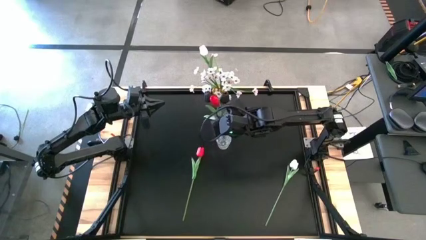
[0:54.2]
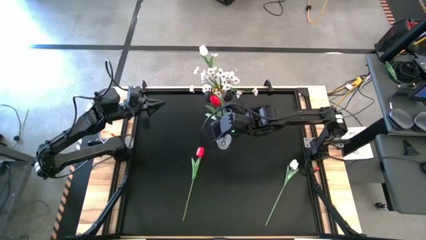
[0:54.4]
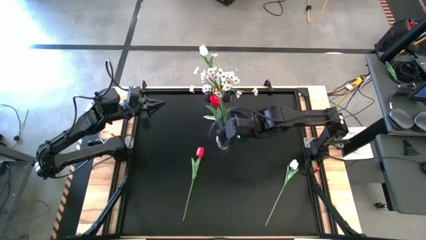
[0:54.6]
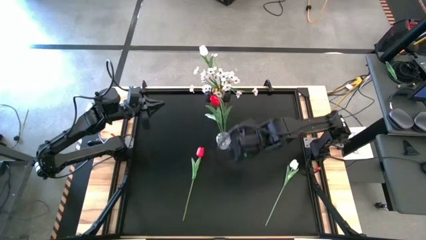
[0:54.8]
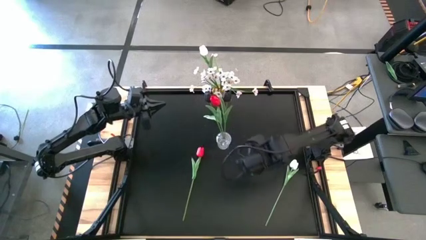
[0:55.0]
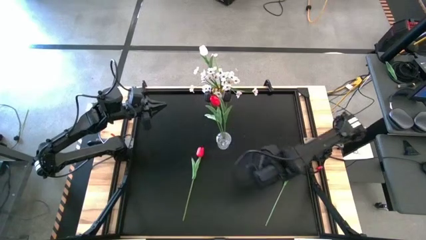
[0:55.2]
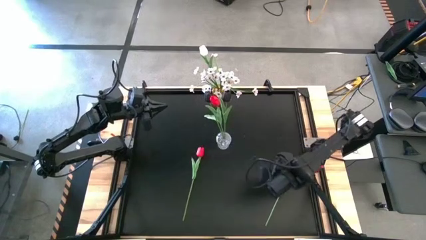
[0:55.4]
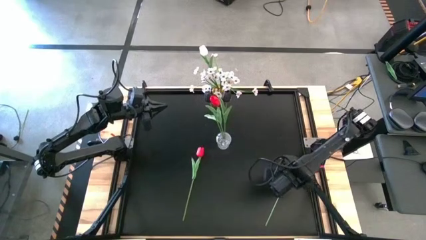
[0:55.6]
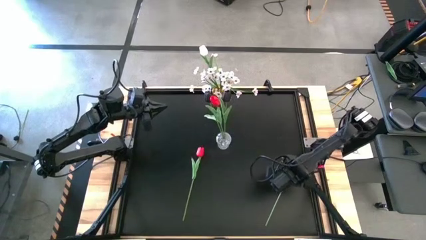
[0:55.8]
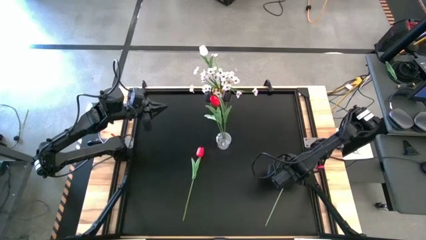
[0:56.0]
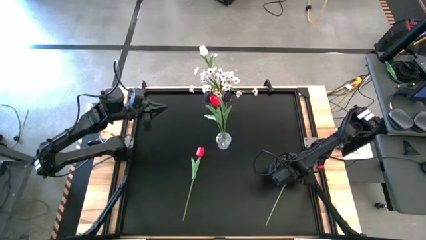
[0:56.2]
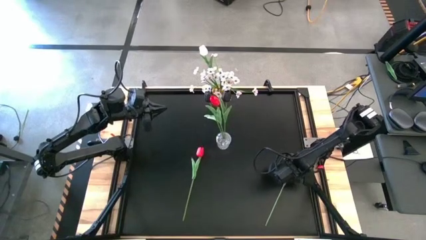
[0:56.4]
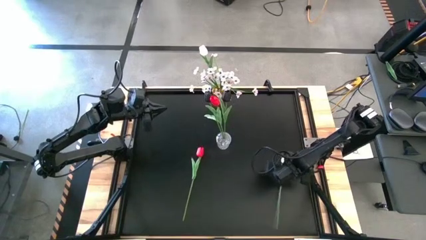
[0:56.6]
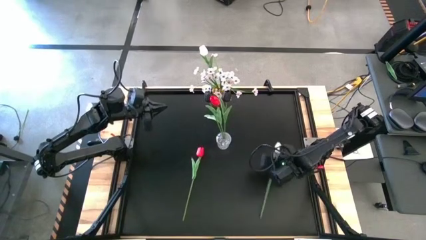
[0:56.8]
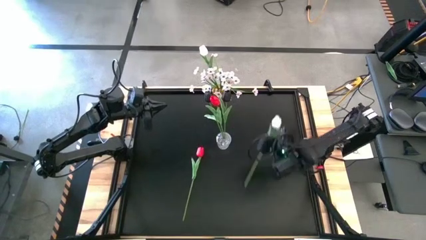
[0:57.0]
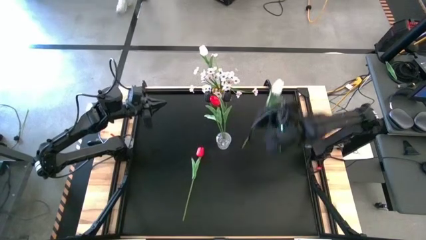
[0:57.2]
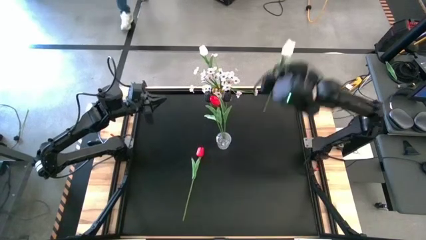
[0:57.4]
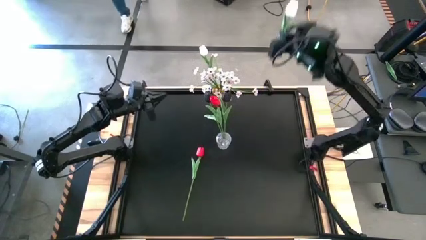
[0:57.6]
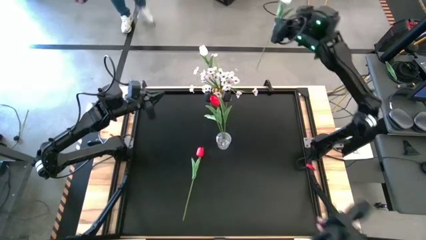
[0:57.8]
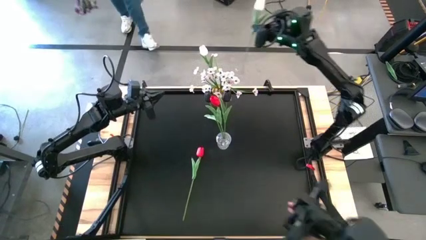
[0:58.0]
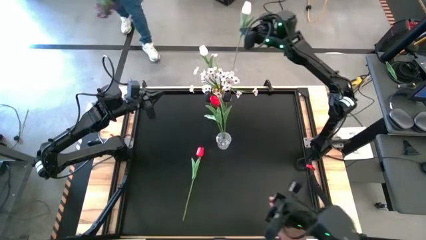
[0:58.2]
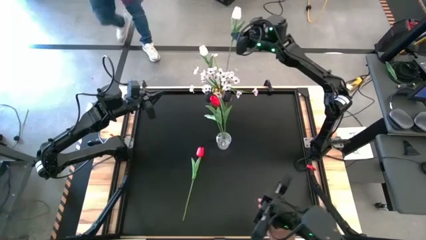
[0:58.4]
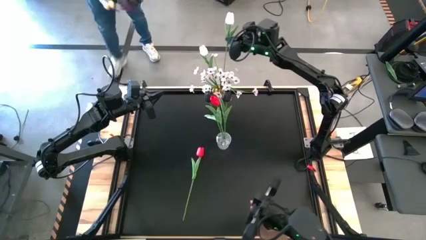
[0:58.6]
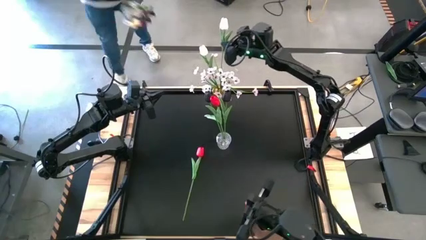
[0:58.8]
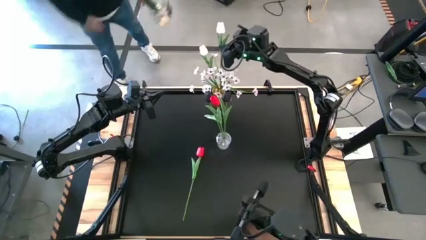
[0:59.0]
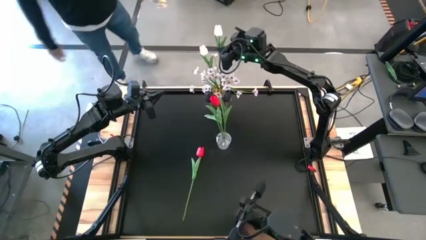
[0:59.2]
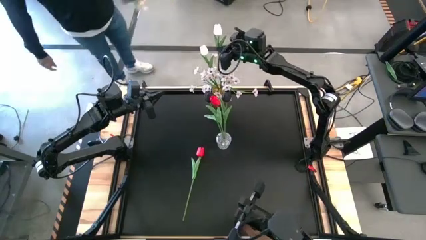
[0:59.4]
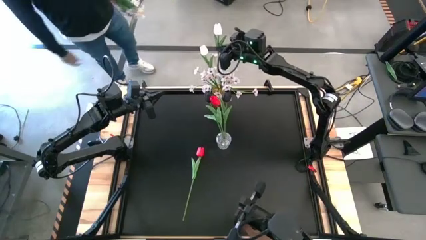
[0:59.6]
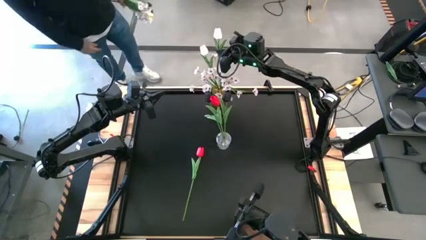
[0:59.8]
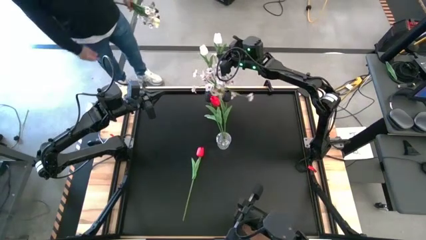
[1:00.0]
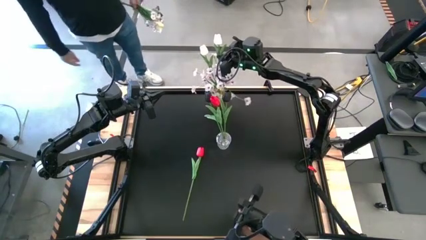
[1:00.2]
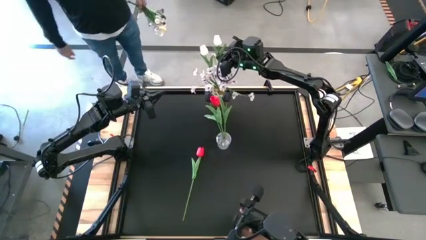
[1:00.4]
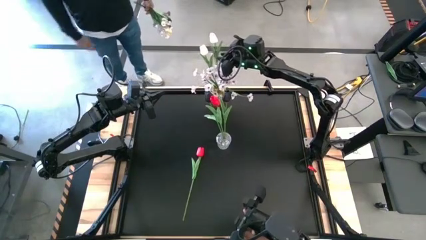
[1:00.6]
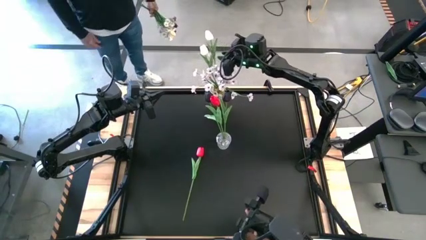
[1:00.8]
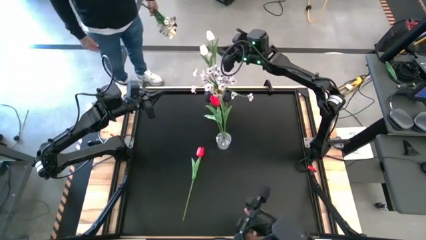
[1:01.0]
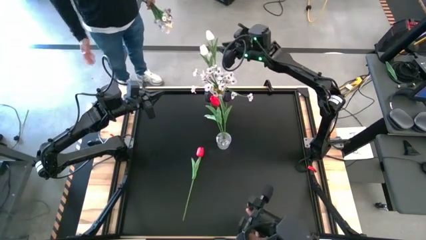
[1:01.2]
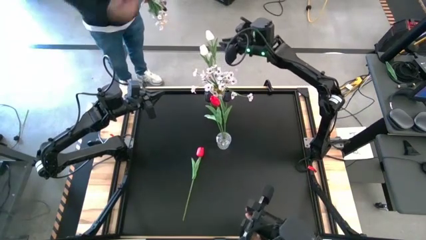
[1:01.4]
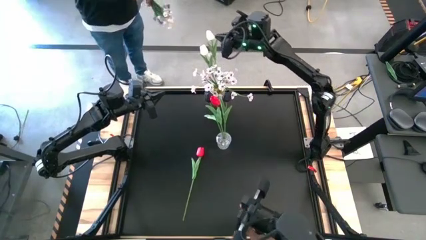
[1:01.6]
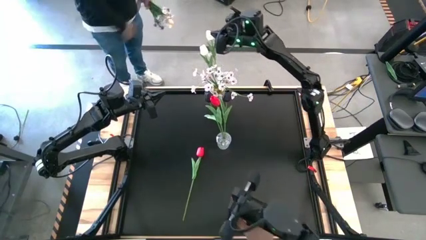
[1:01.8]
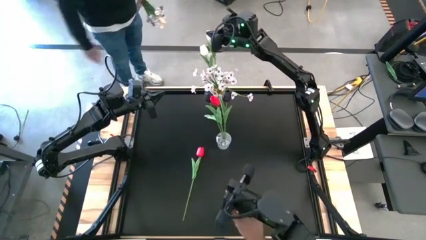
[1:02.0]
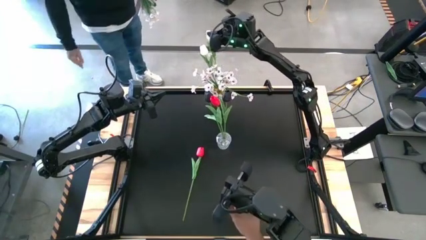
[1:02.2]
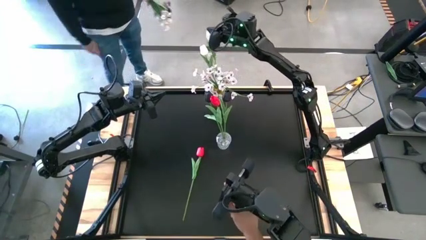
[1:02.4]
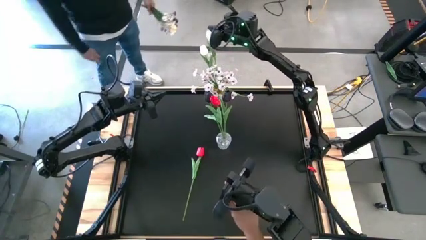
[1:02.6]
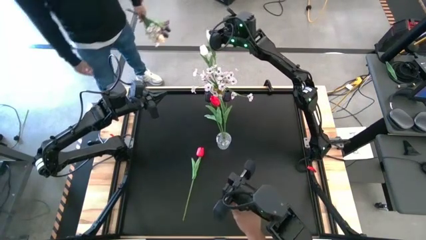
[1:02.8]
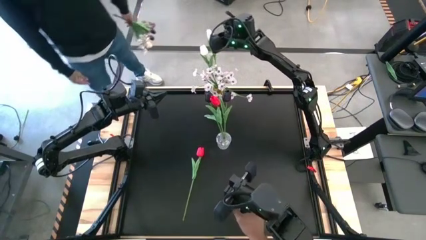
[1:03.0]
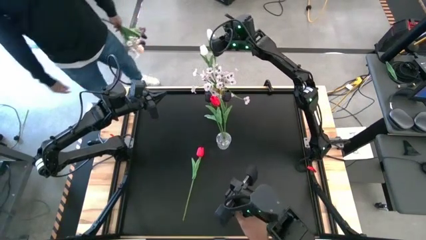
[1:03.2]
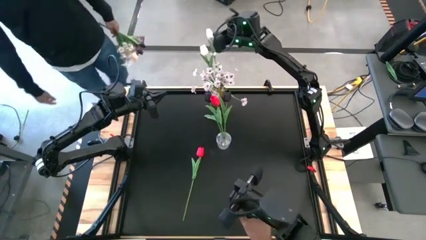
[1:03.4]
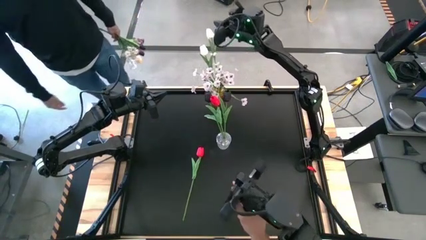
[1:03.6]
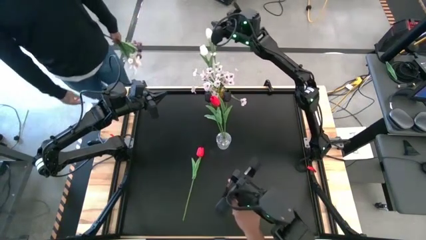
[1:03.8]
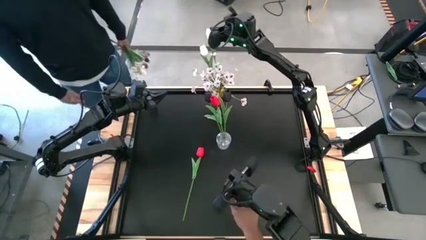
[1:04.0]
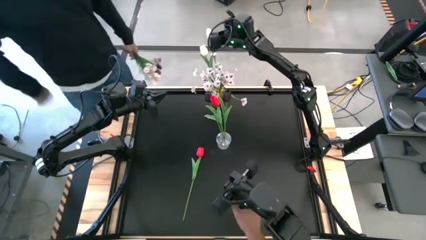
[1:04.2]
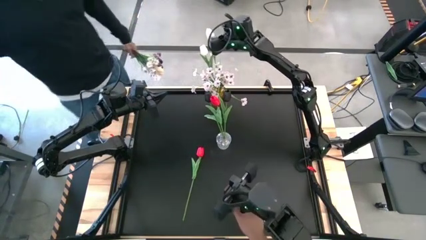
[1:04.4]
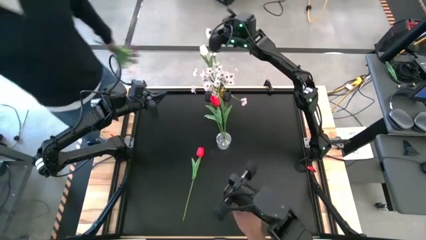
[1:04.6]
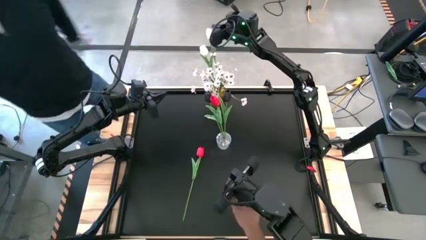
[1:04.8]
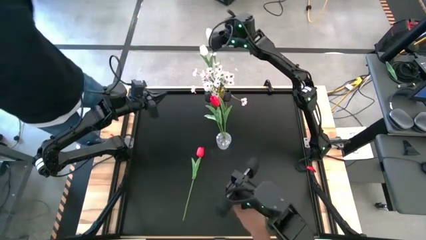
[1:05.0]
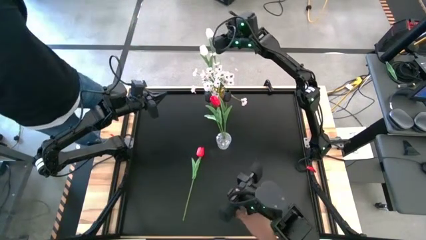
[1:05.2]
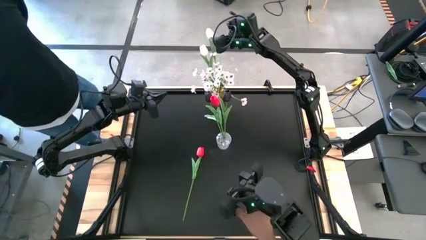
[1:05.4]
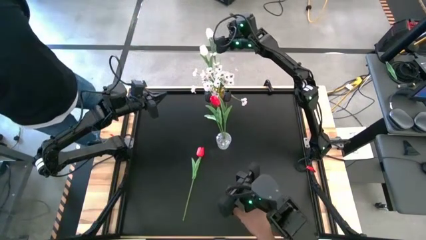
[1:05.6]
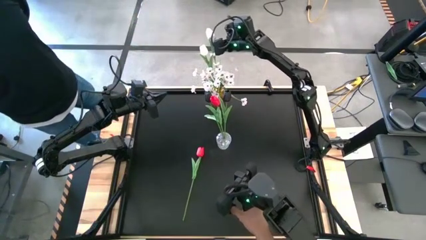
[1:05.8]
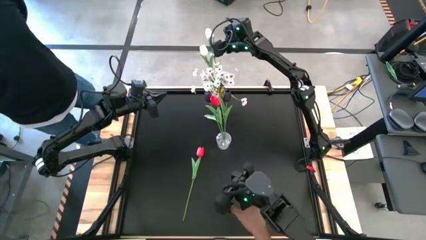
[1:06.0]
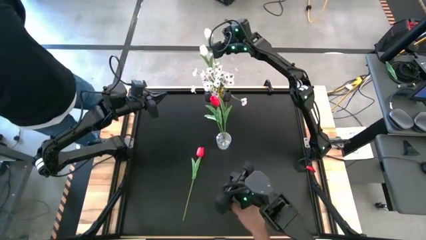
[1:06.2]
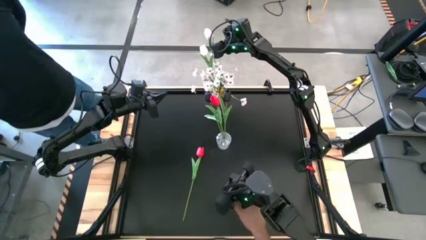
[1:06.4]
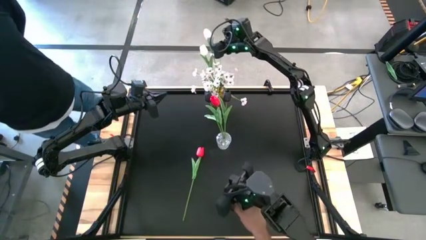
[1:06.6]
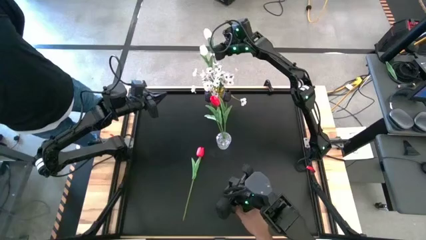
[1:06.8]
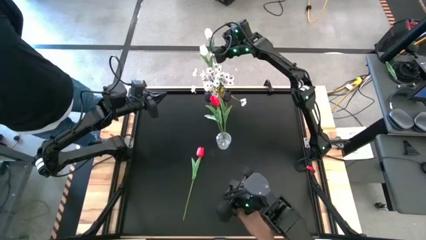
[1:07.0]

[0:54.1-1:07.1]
Task: Sort flowers into vase by color
Put the white tulip into the yellow vase
